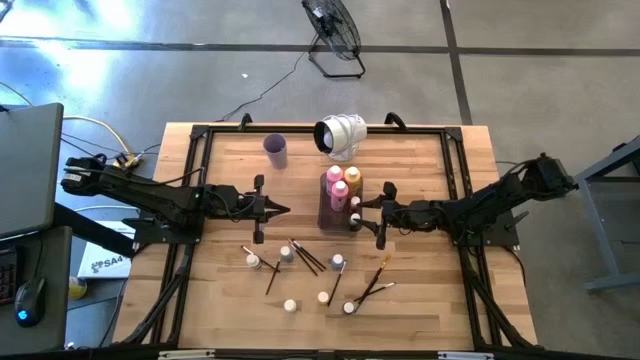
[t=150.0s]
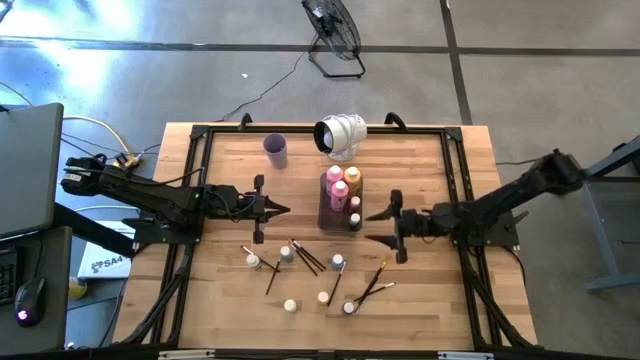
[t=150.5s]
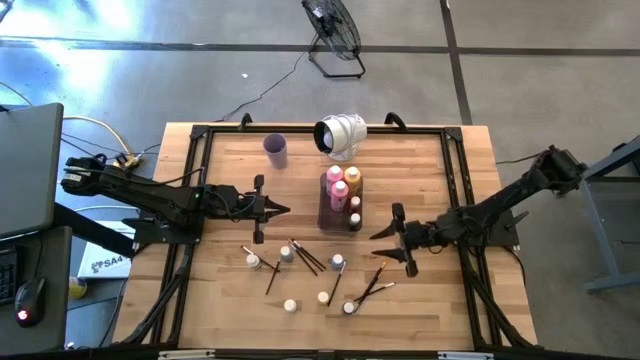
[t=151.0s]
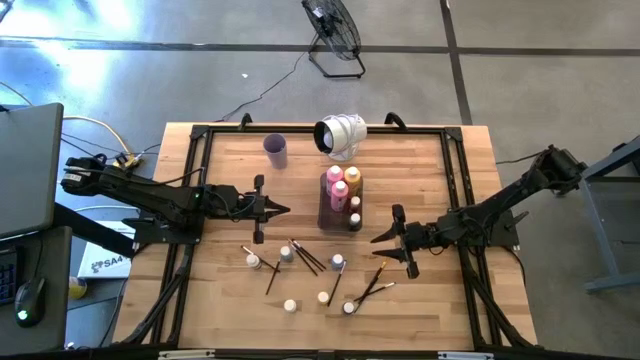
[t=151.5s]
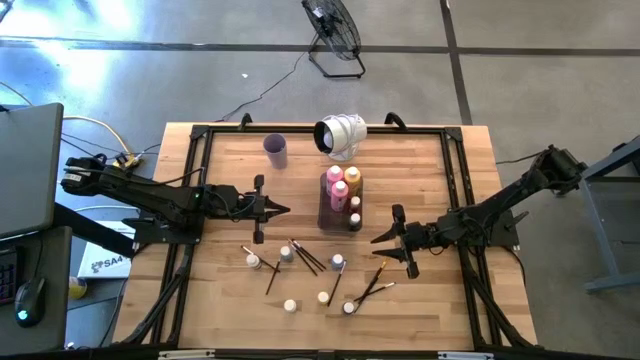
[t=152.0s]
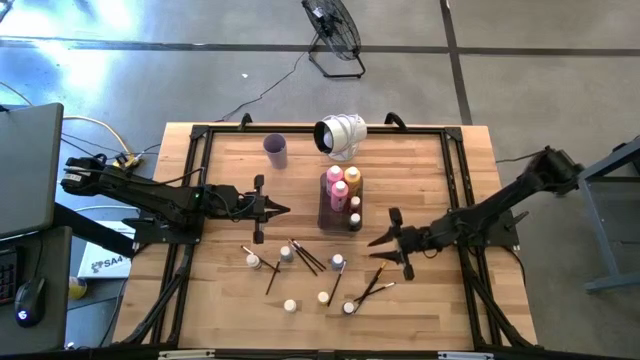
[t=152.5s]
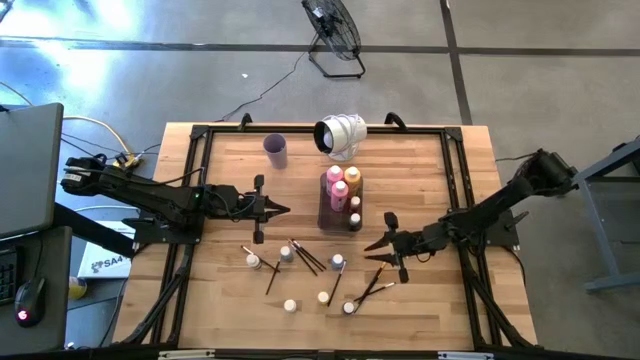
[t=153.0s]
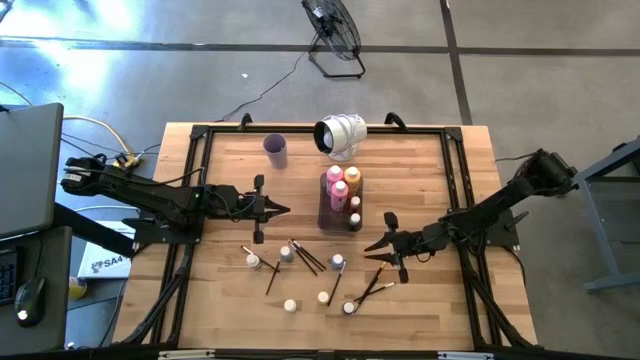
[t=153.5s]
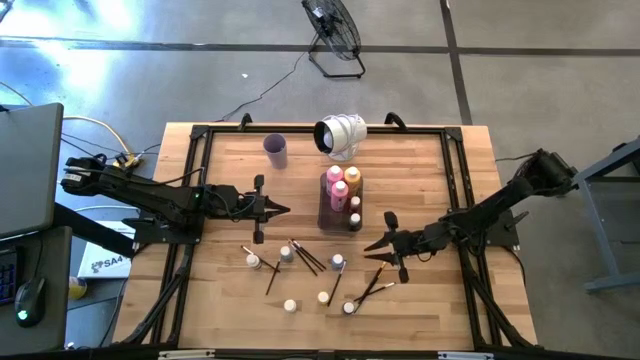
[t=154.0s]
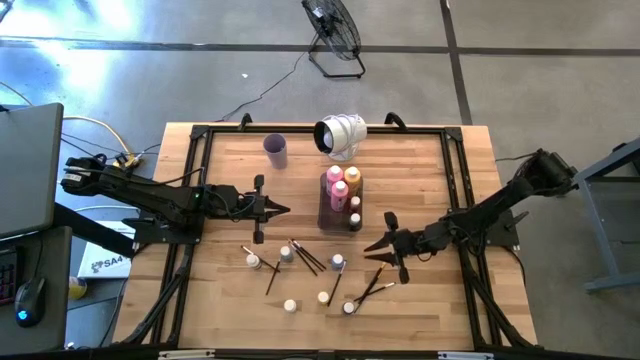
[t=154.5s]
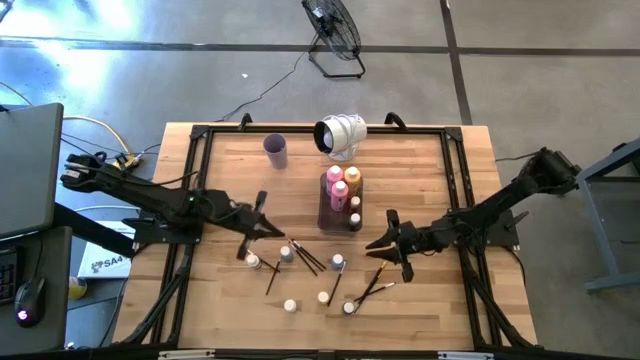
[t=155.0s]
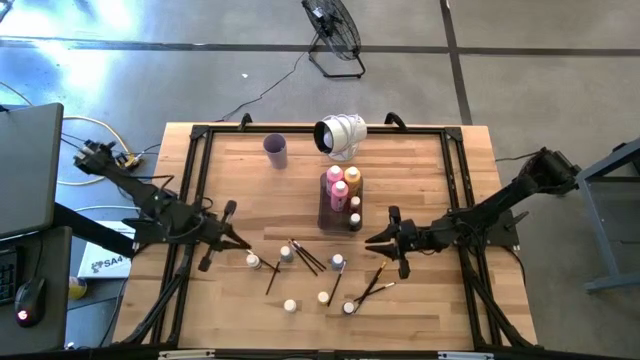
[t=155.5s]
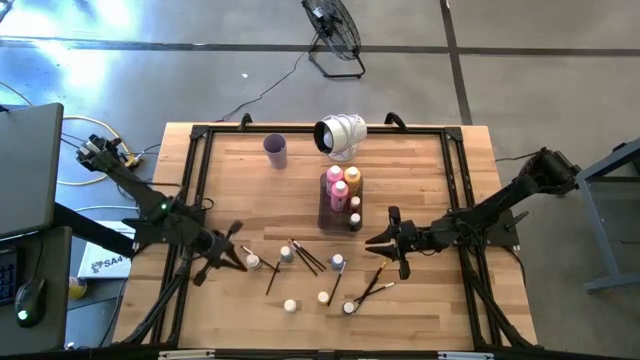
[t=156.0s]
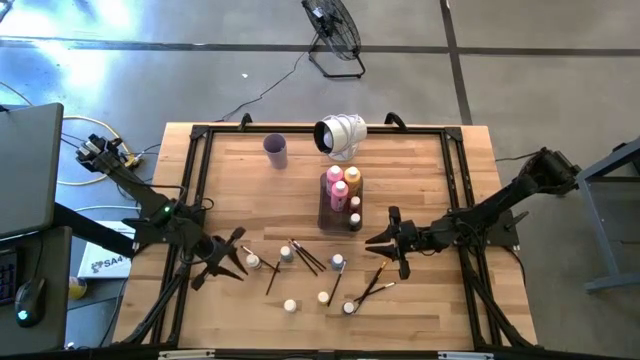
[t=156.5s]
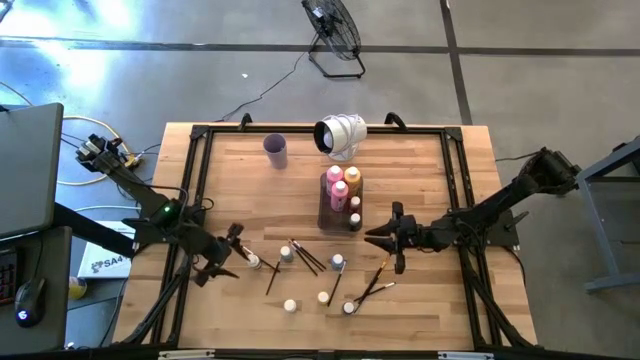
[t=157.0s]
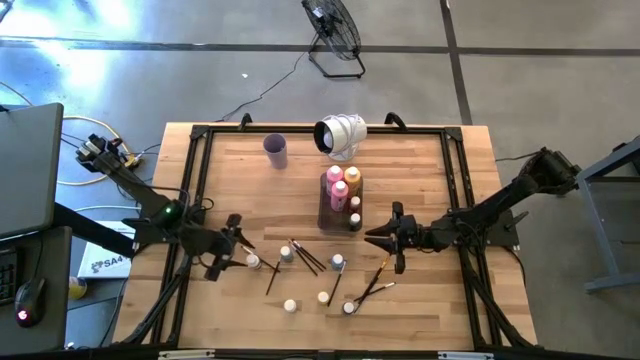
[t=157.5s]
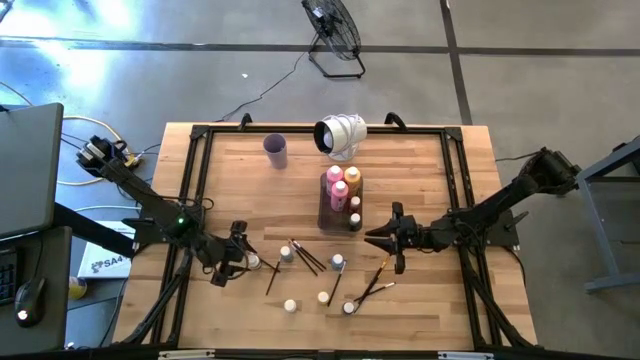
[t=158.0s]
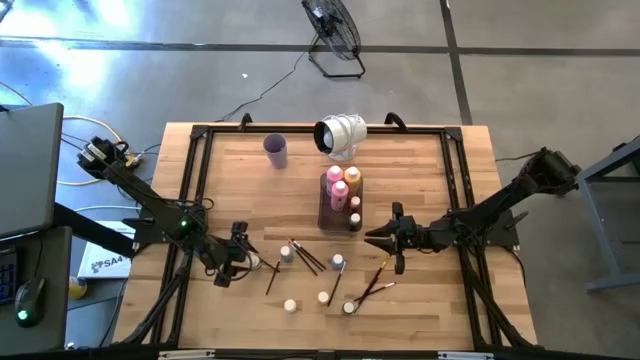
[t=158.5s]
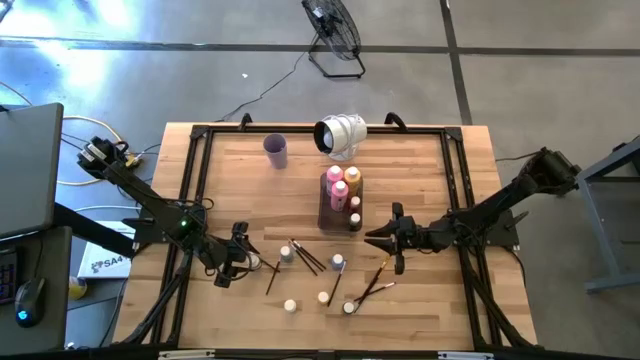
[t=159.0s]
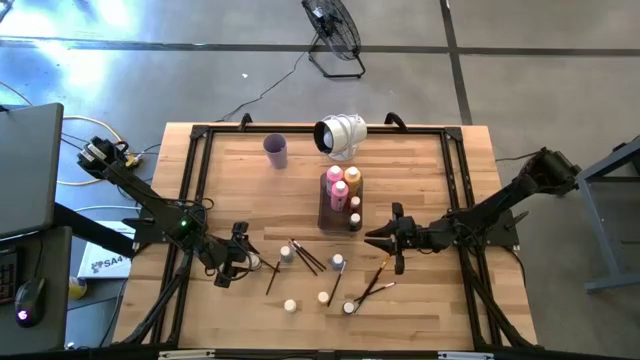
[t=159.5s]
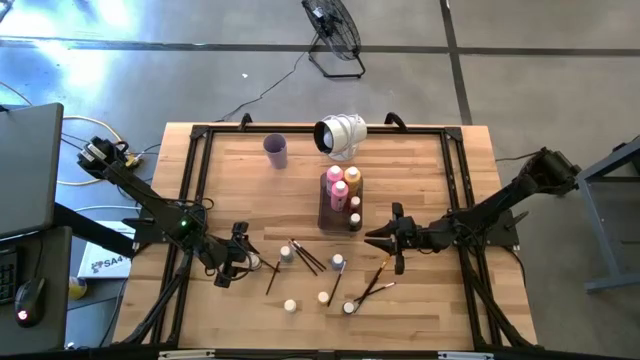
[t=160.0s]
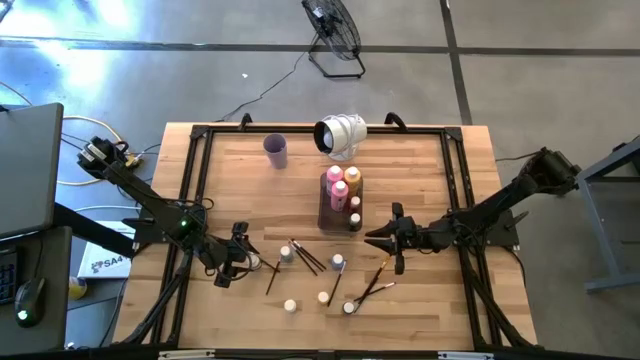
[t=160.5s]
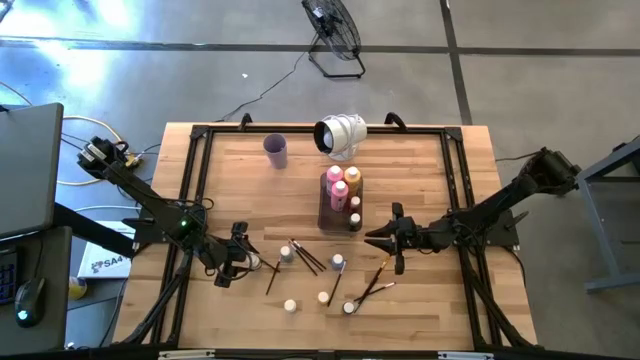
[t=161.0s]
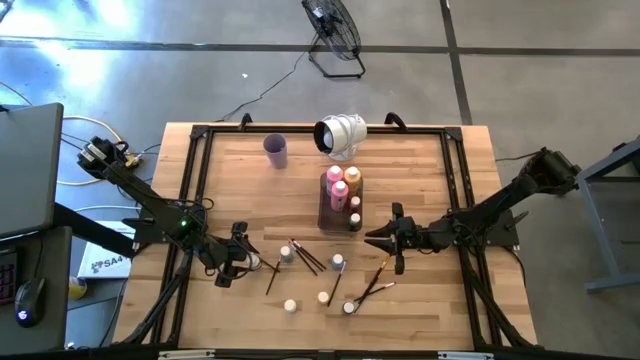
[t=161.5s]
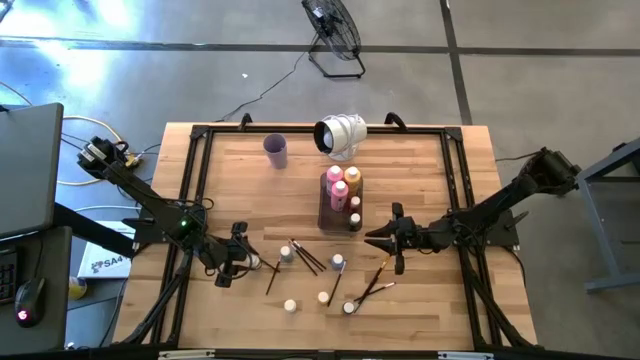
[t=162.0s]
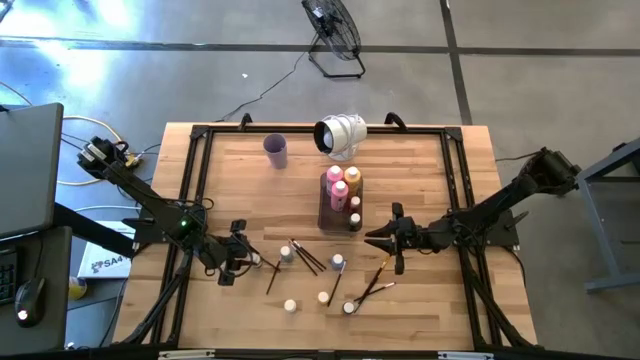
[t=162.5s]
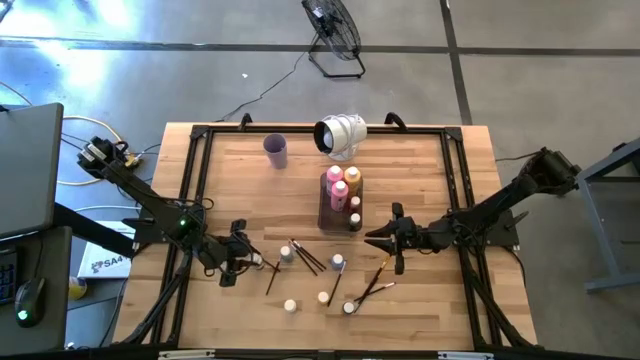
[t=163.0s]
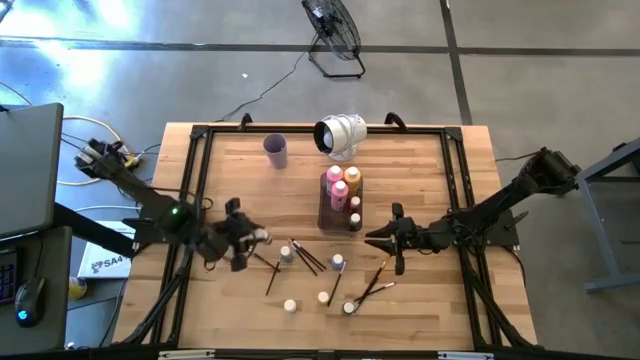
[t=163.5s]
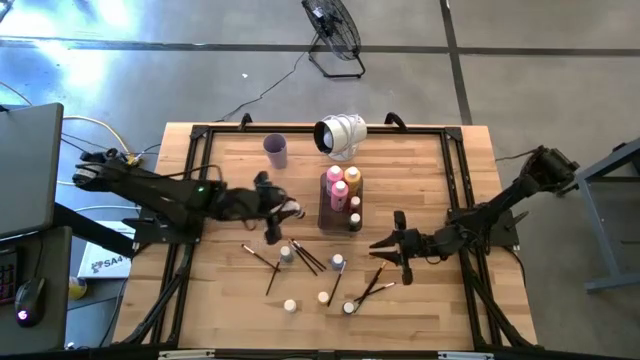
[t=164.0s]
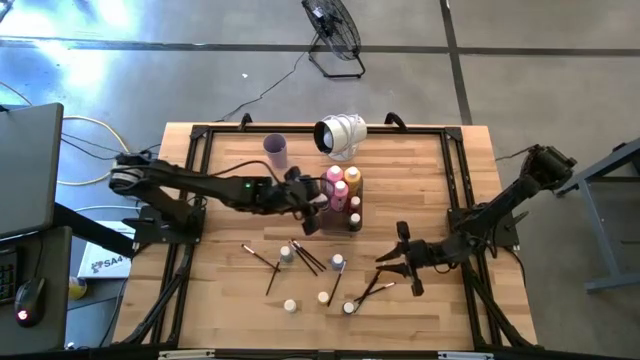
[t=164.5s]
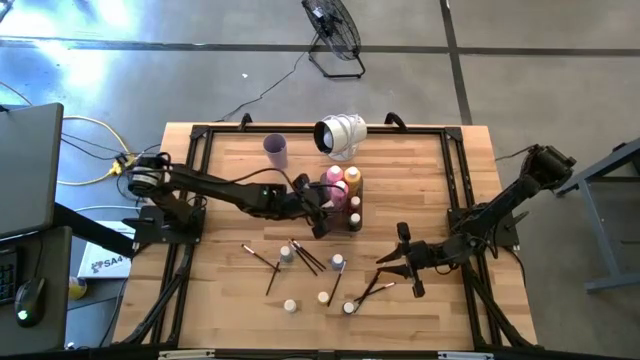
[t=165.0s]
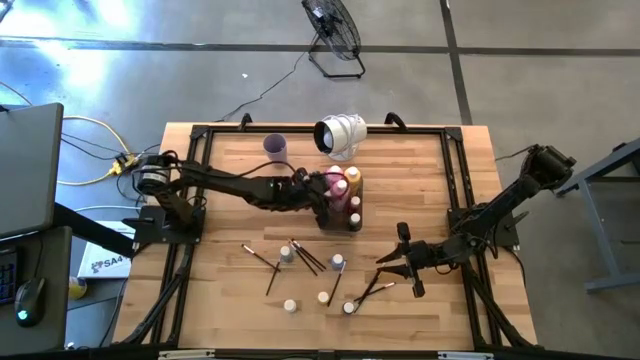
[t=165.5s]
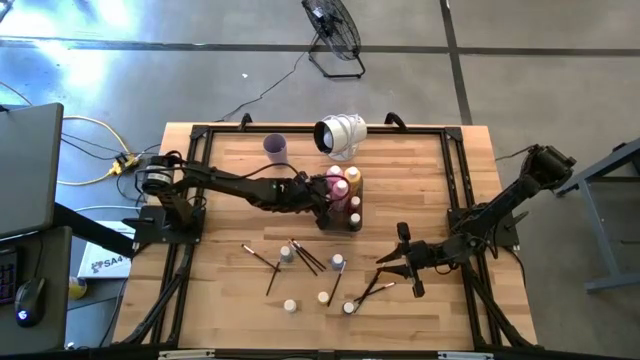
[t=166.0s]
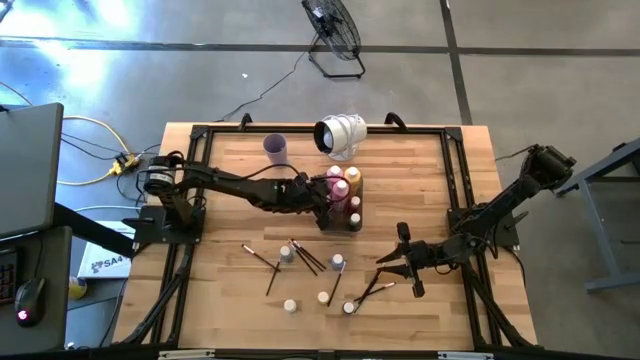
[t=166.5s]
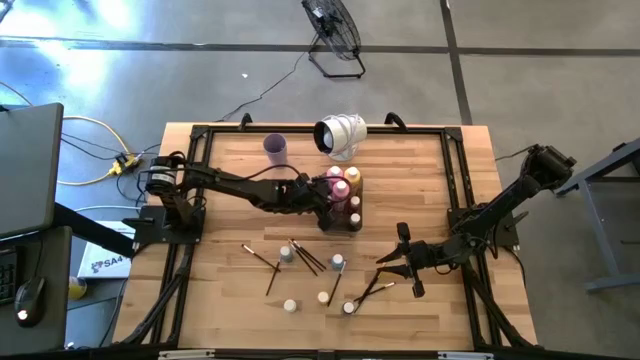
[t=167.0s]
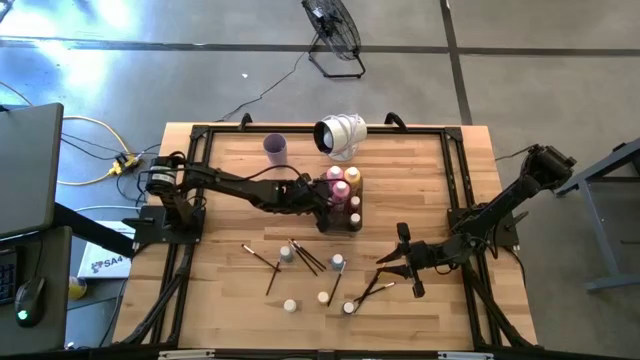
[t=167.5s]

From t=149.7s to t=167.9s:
Task: Pick & Place Paint Supplies
Put the top white paint bottle into the black bin

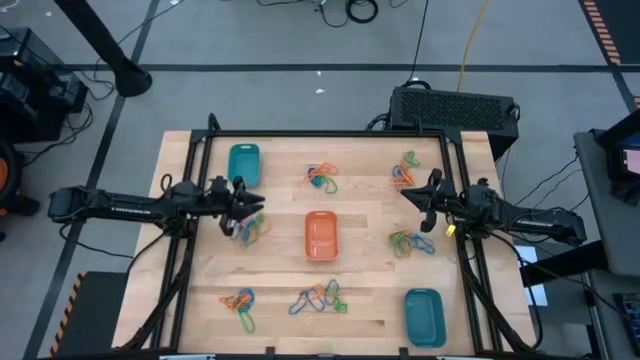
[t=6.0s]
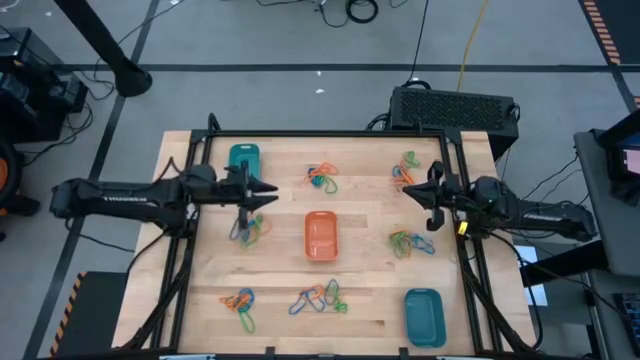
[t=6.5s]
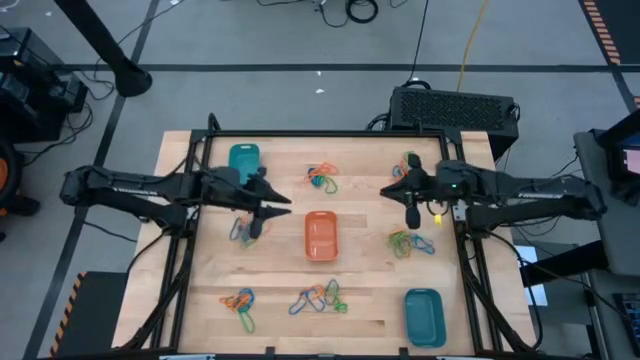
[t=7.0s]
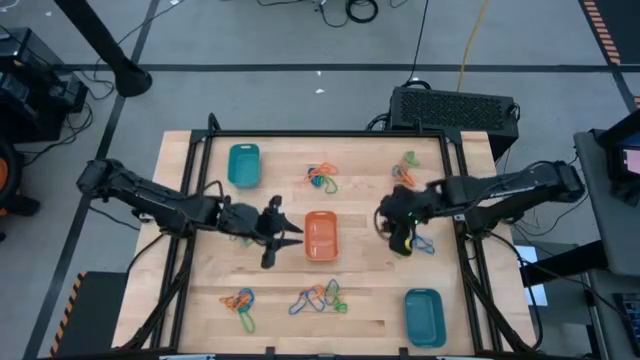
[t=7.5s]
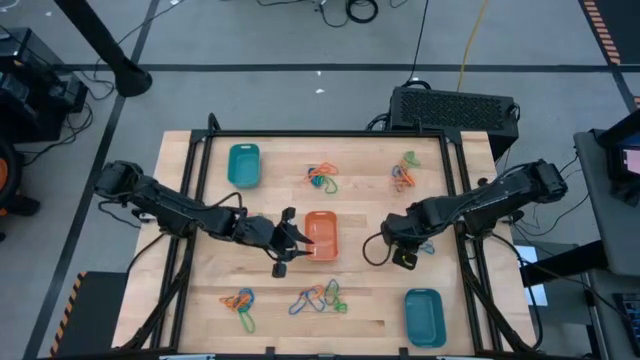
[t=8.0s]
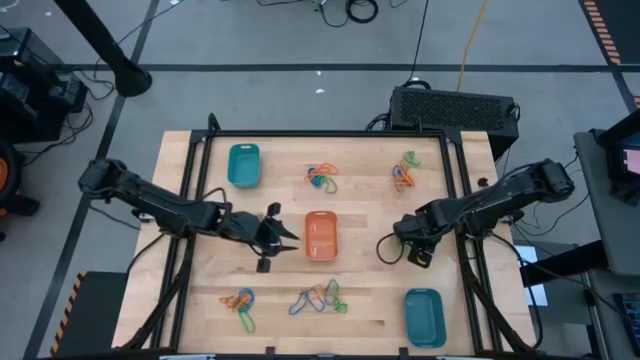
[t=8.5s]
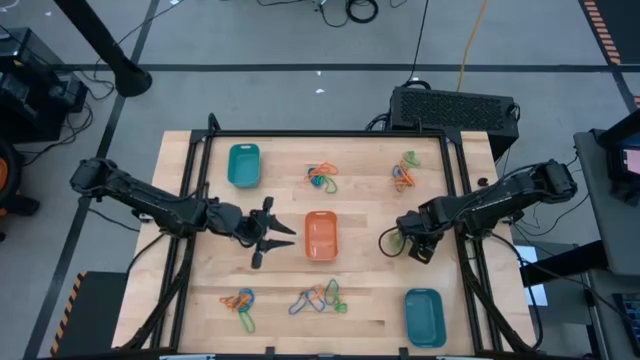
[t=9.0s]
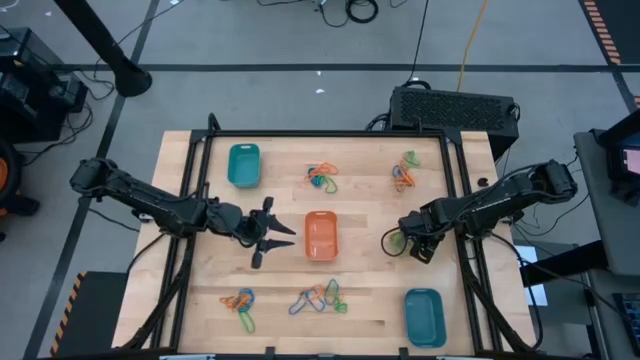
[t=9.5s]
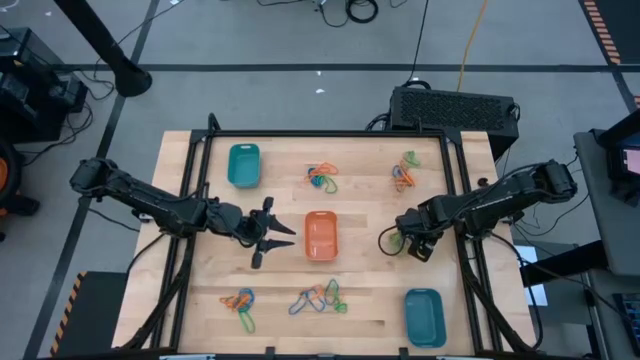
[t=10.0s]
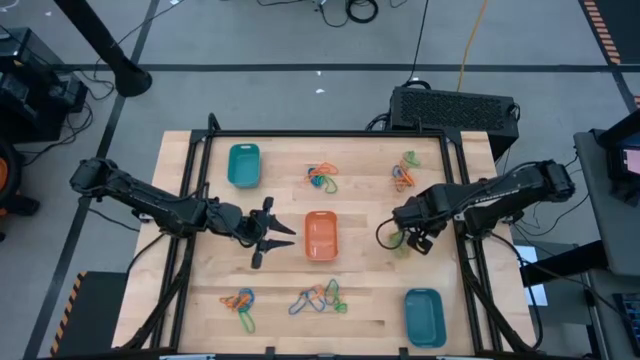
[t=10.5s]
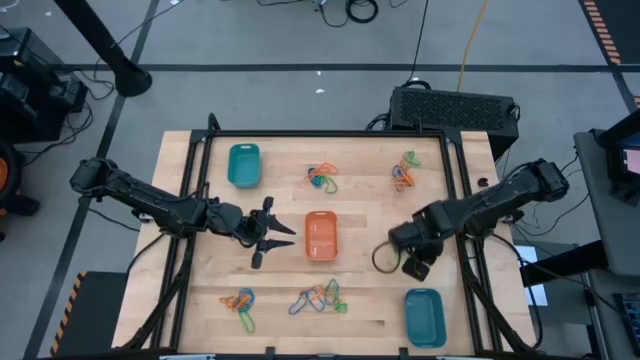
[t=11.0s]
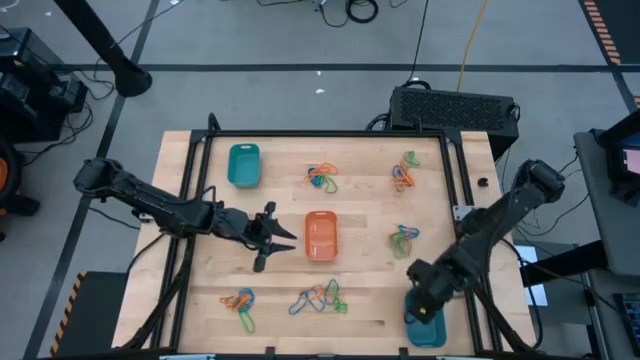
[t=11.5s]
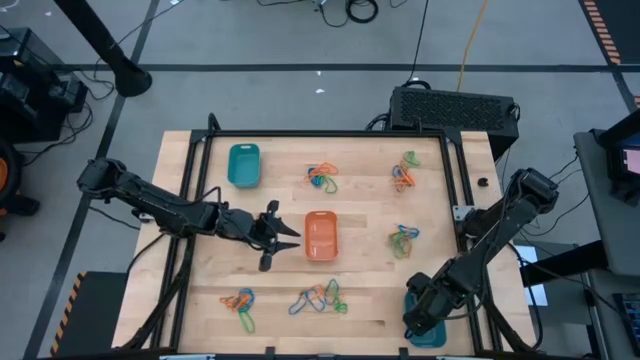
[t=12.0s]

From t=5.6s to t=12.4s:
Task: Sort rubber bands into baskets
Put the blue rubber band into the blue bin
